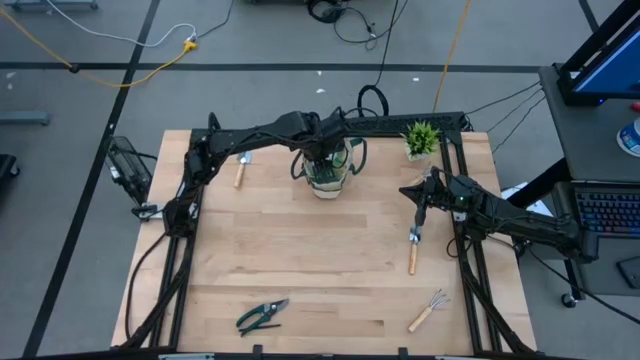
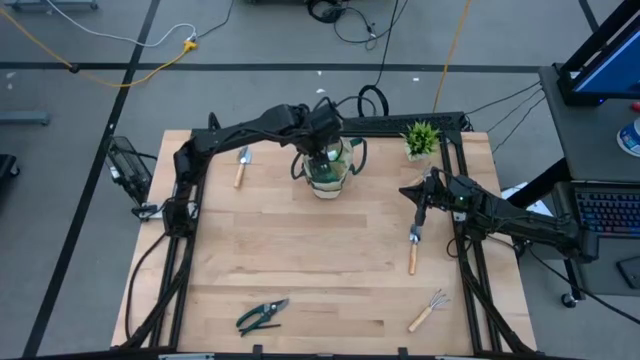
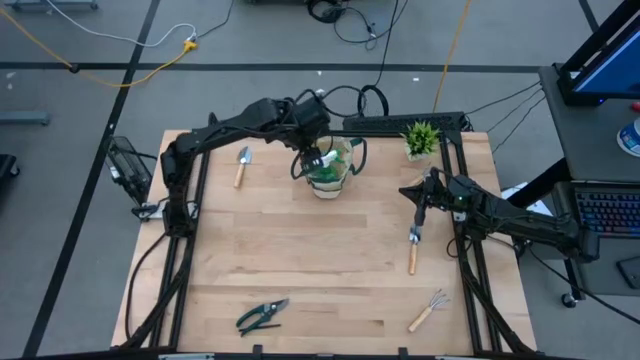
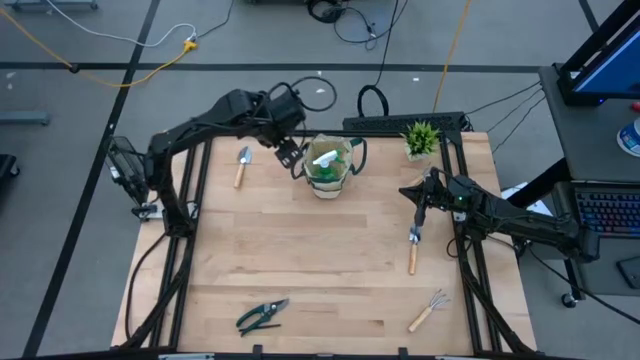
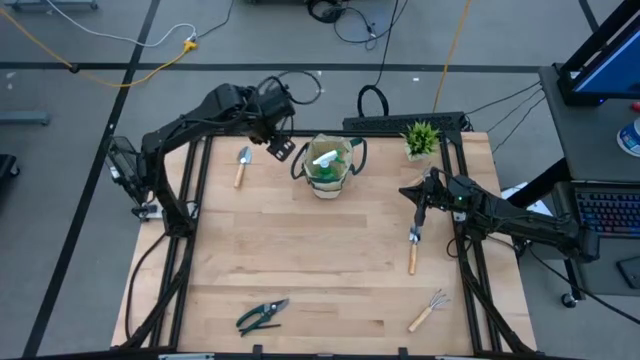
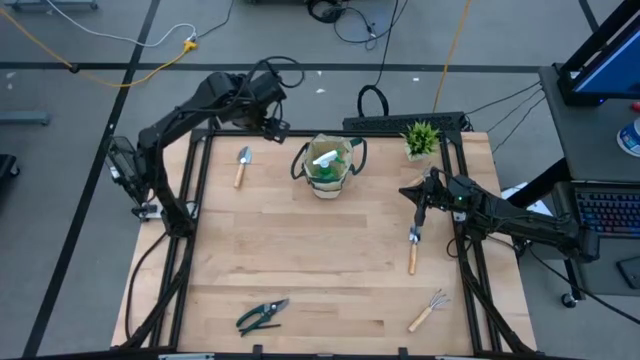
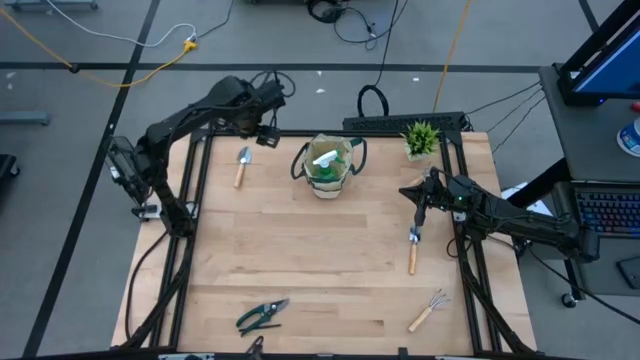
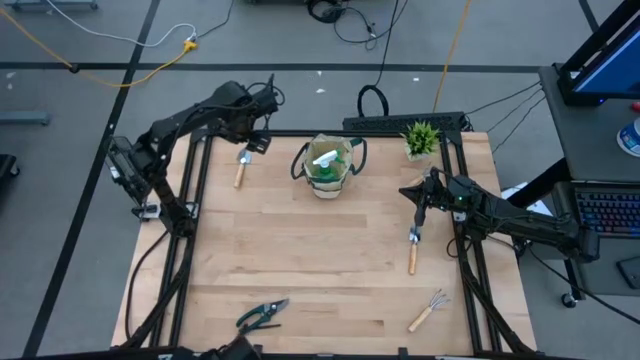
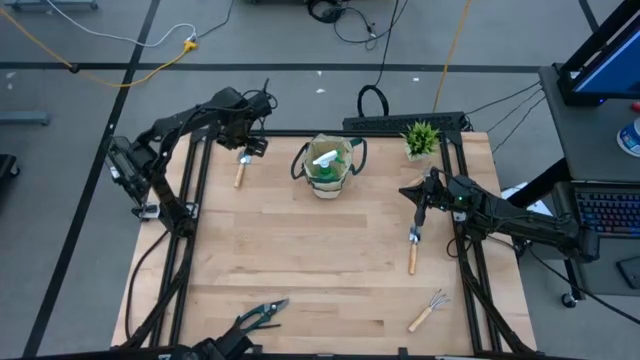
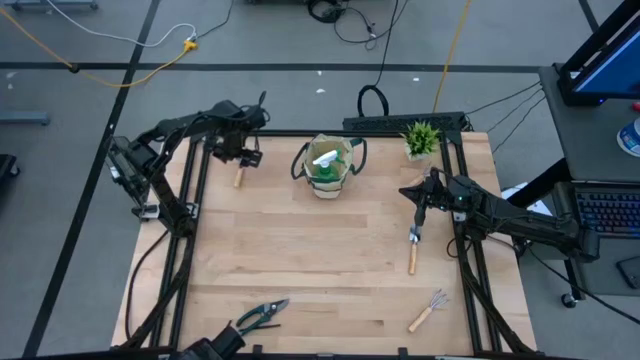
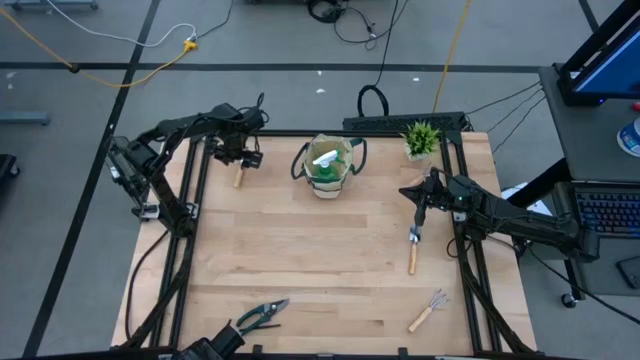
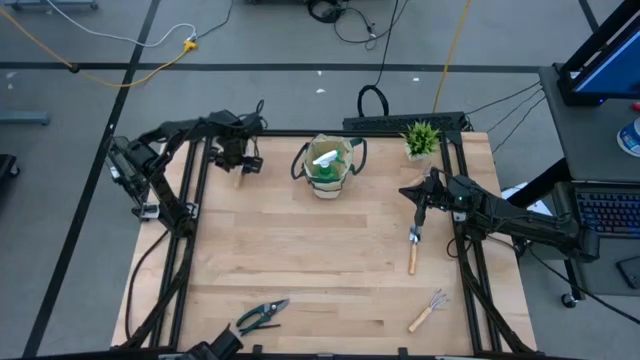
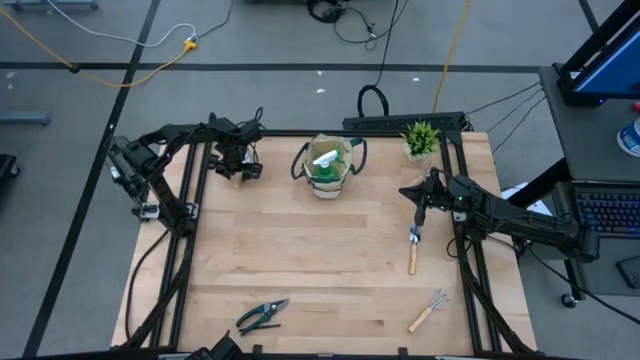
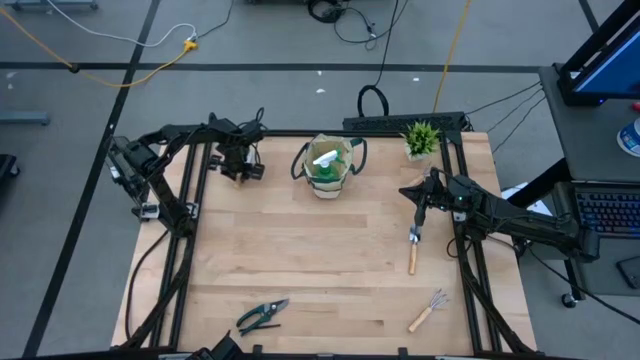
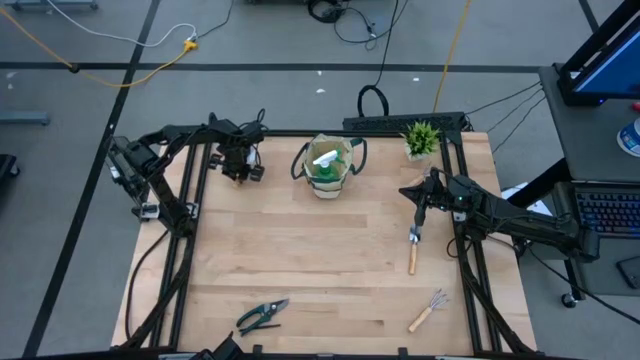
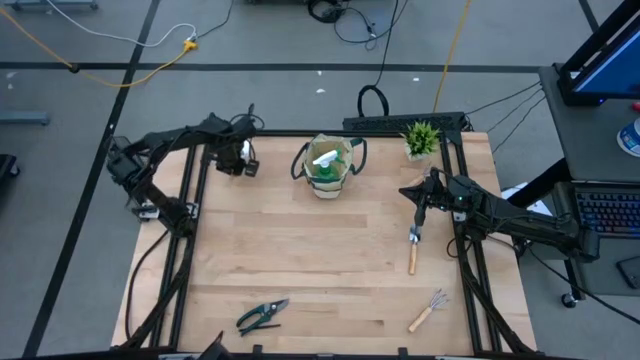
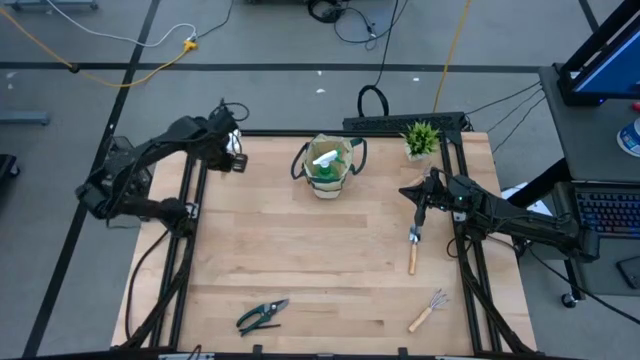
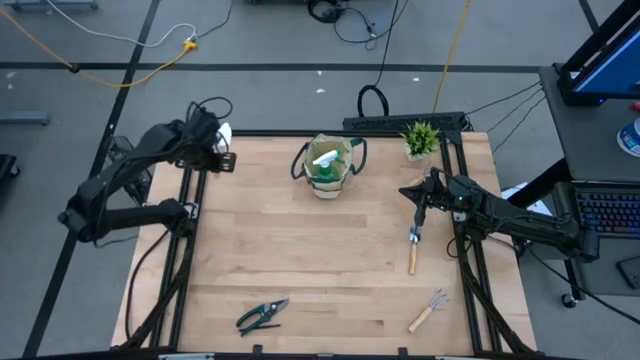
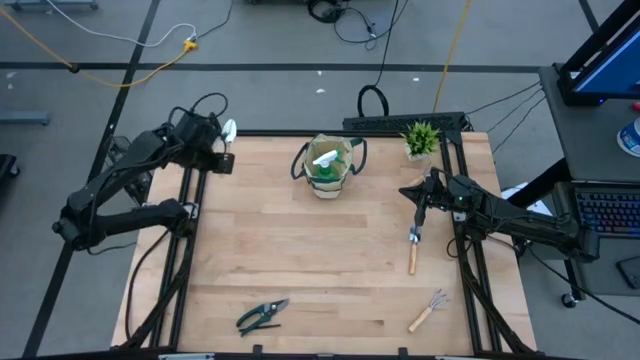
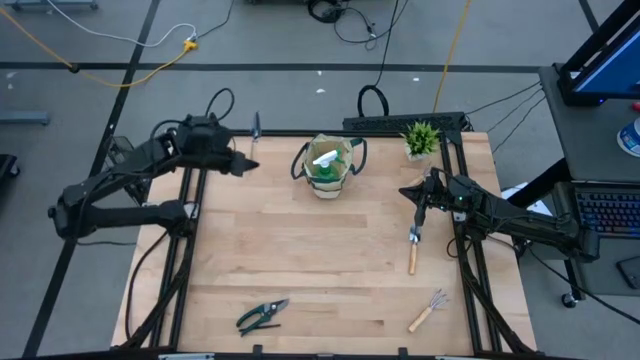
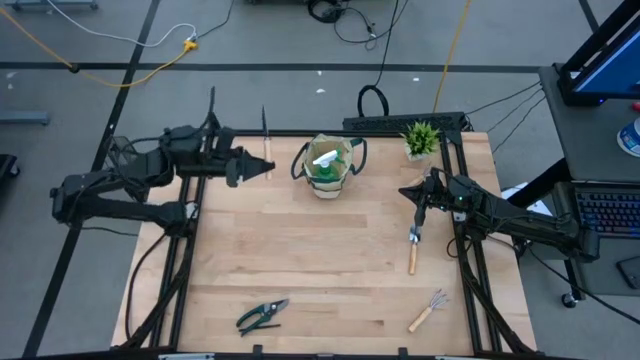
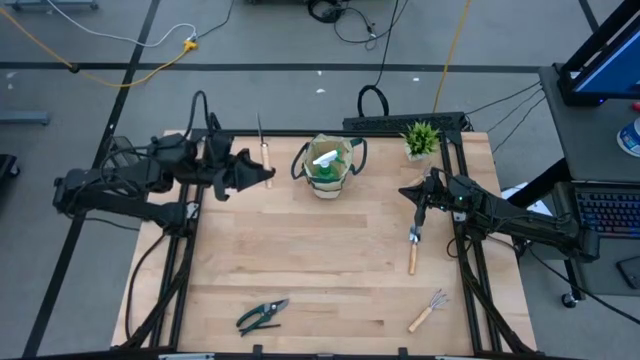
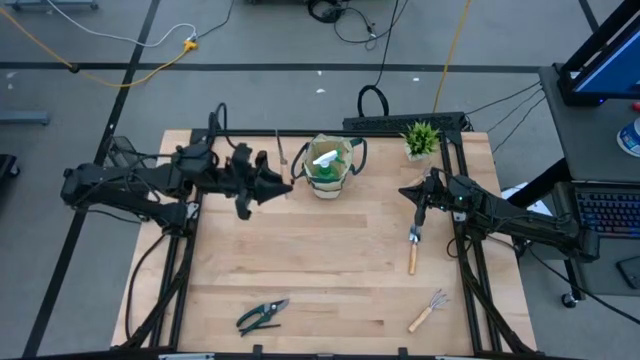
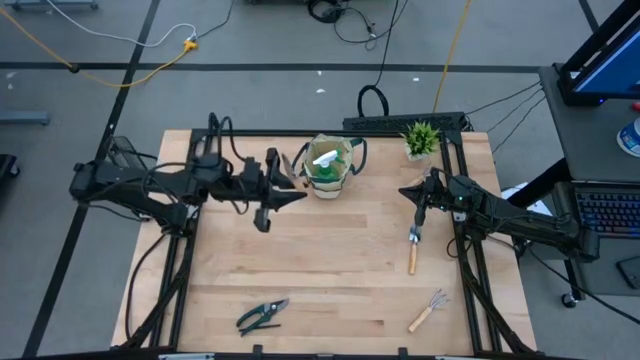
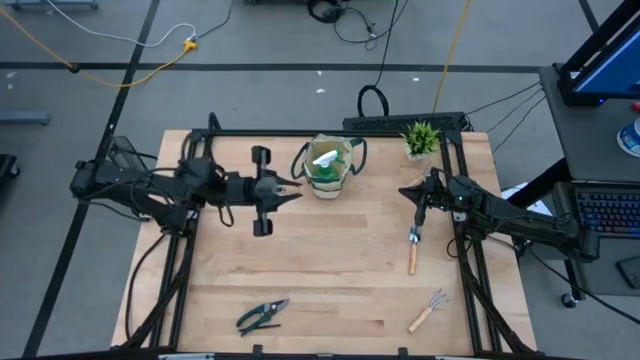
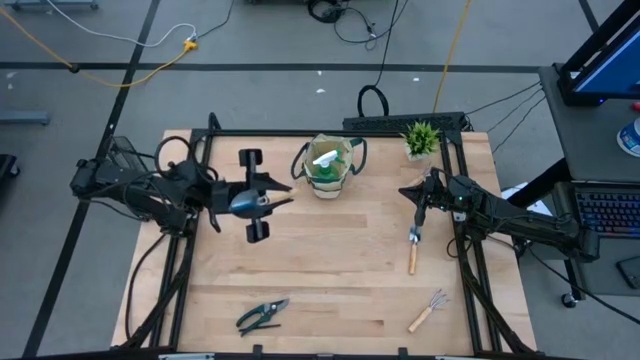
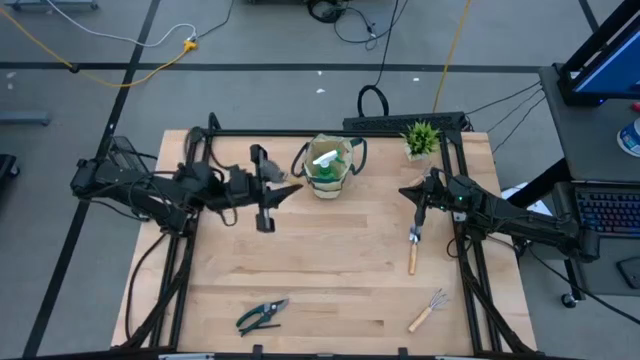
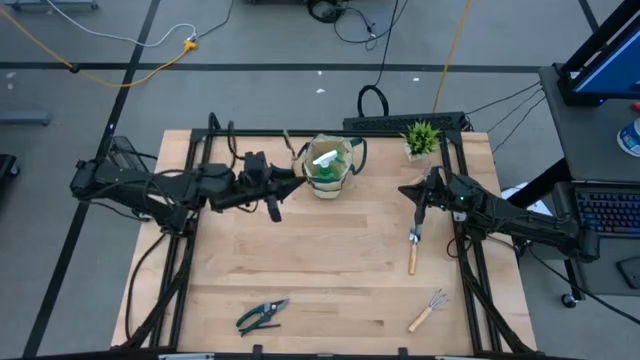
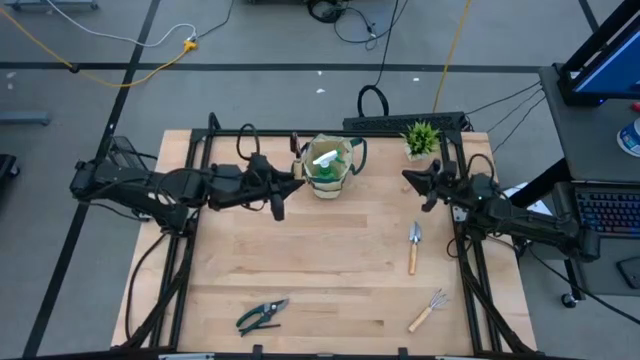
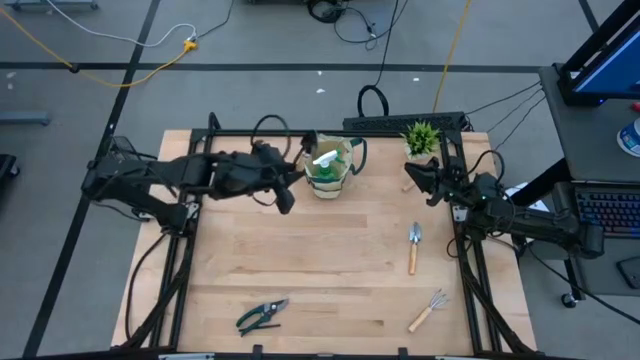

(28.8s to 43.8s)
Task: Pick & Place Garden tools in Gardening bag
Put the top brown trowel into the gardening bag
